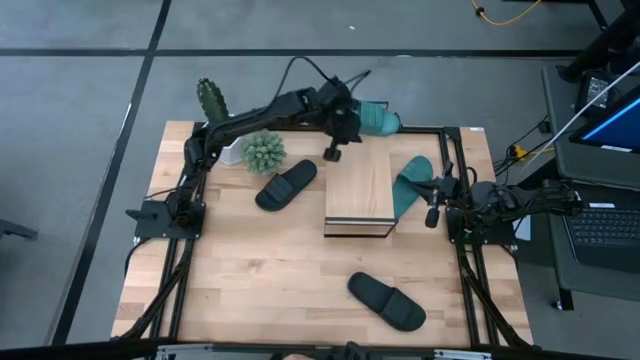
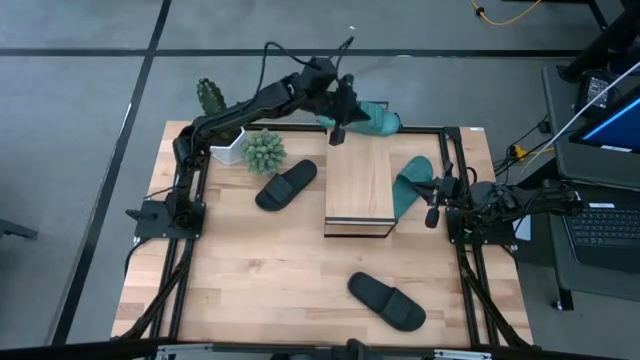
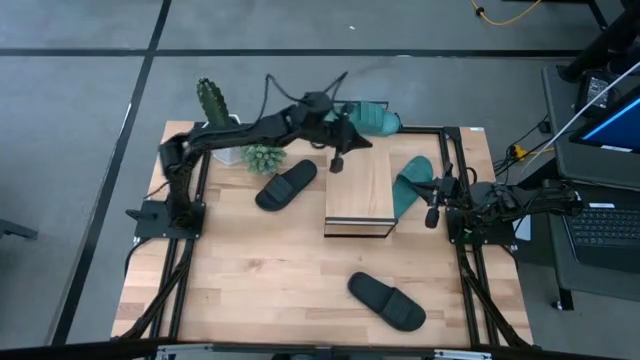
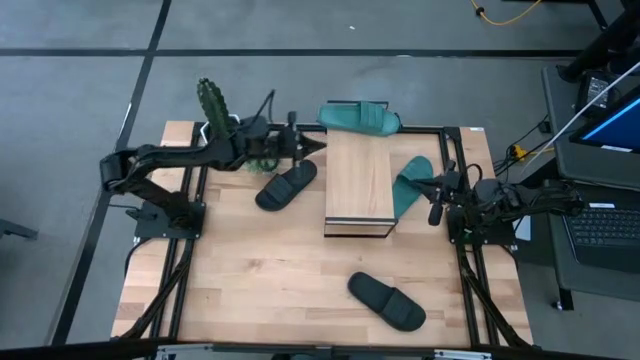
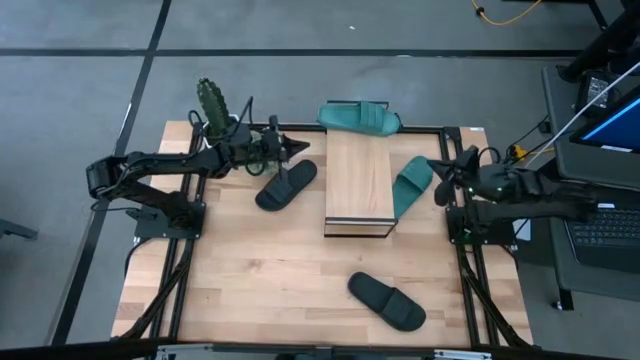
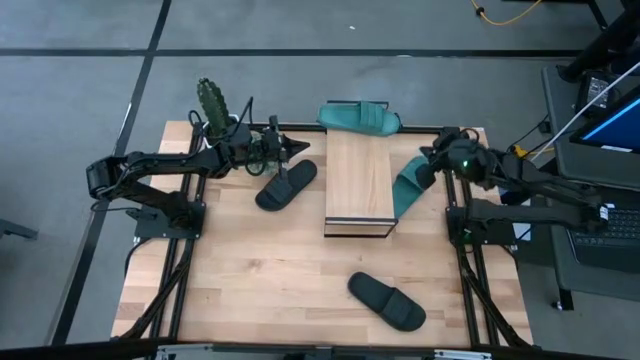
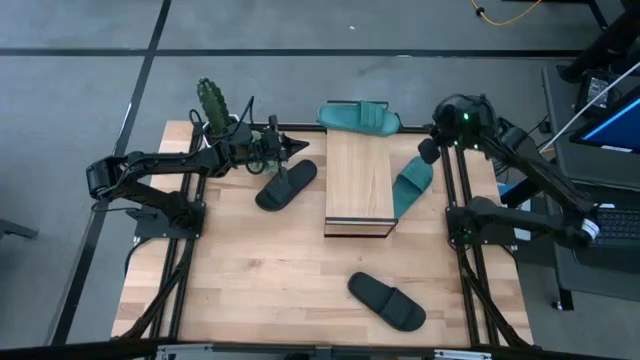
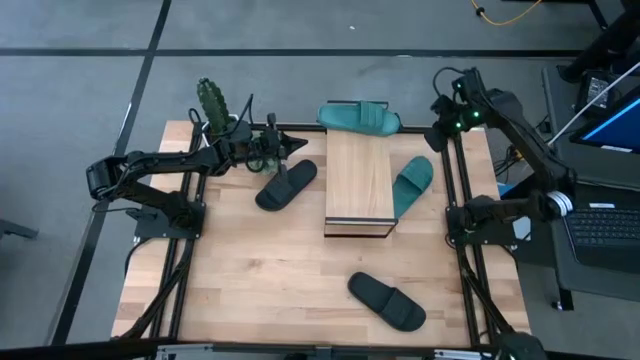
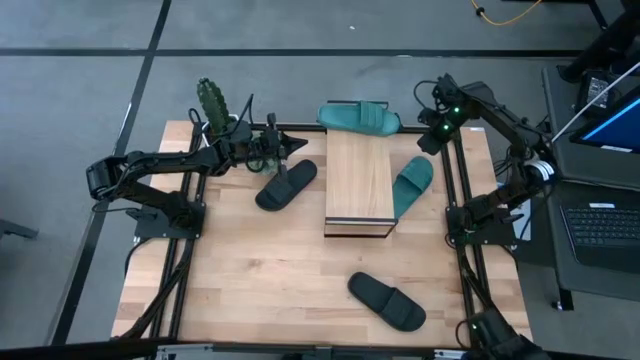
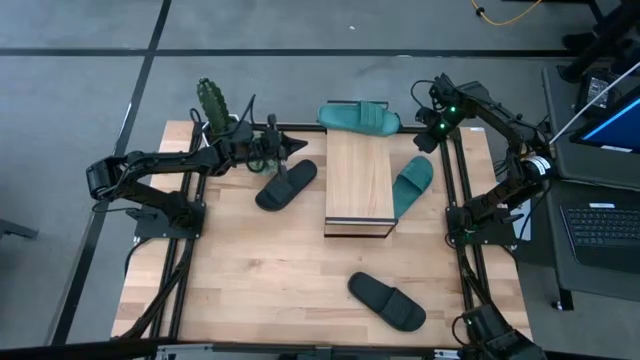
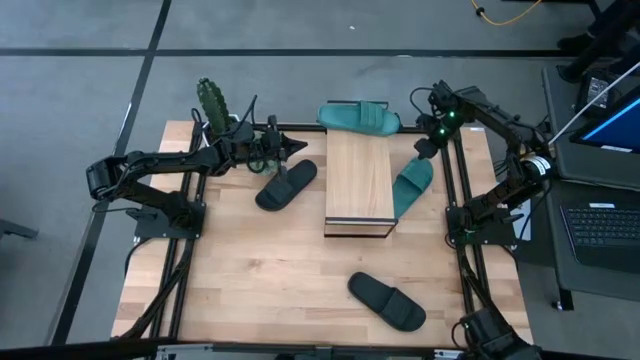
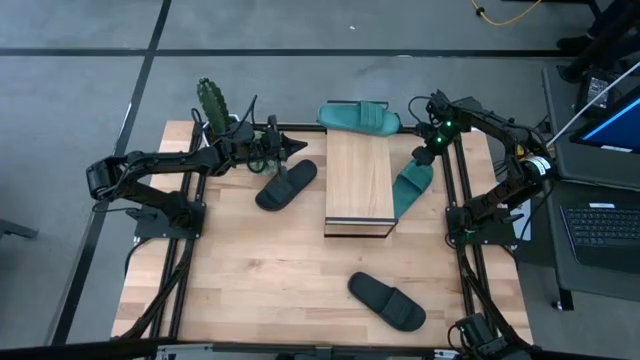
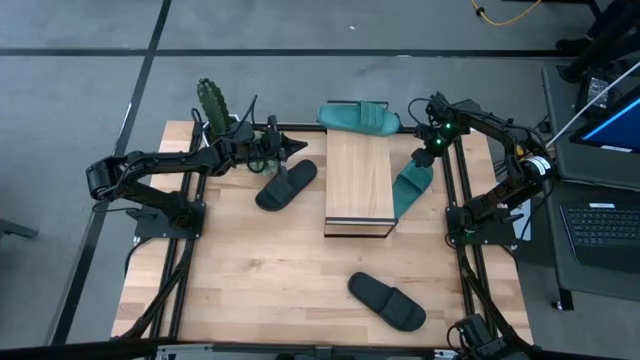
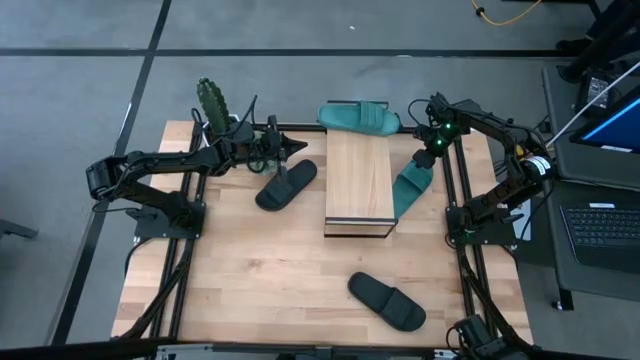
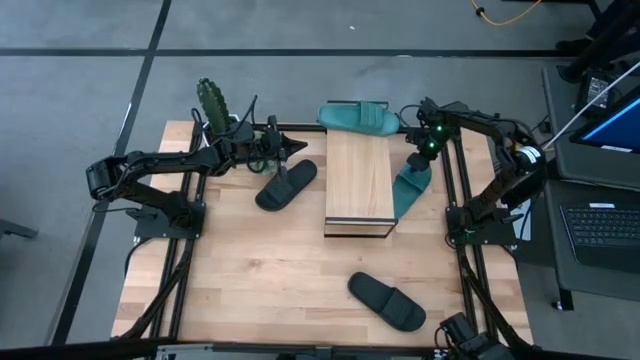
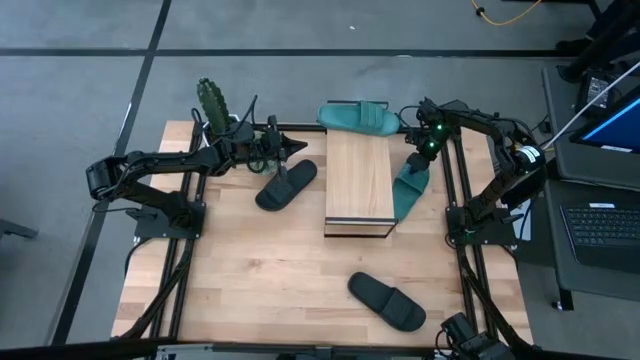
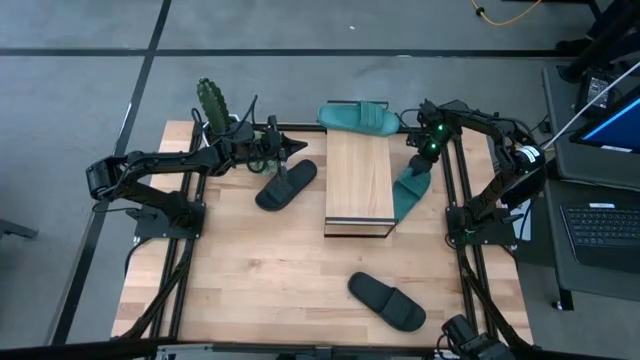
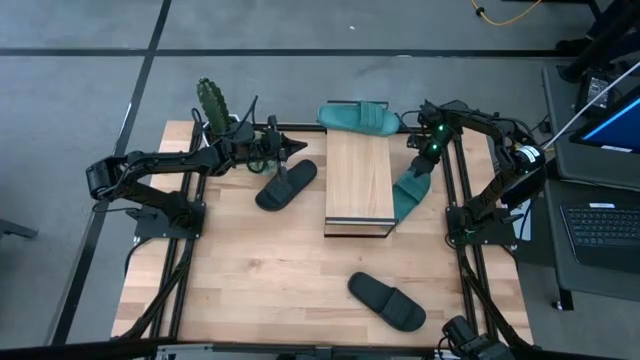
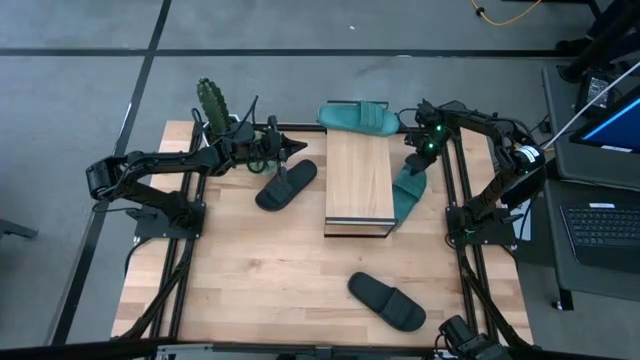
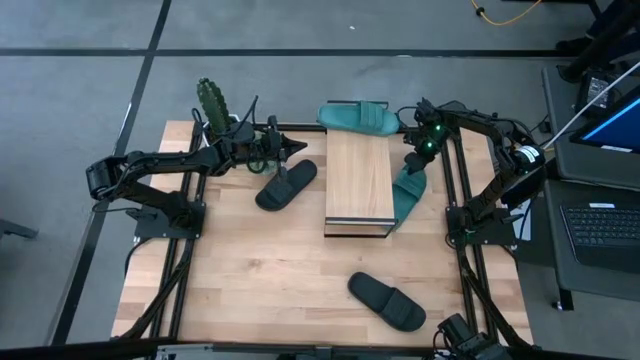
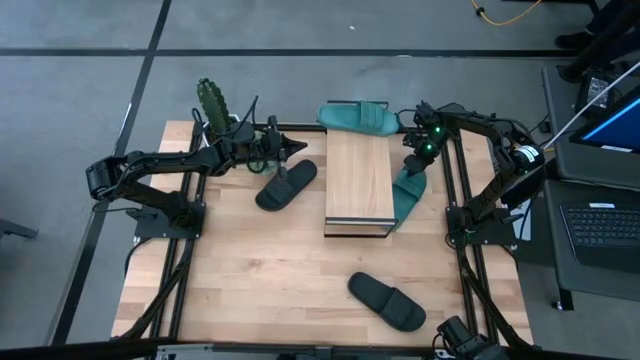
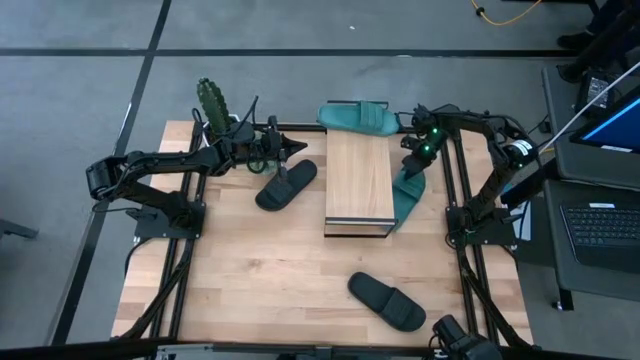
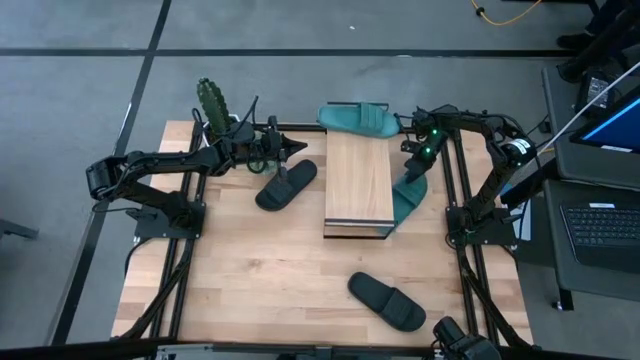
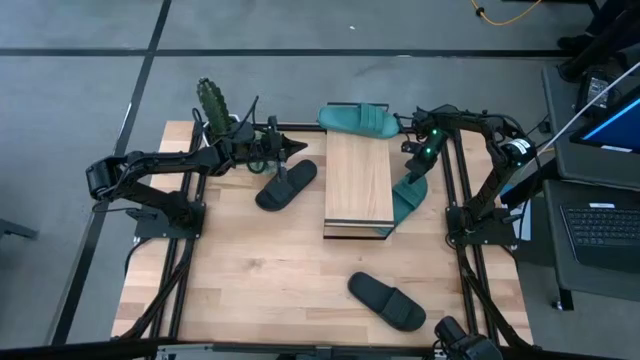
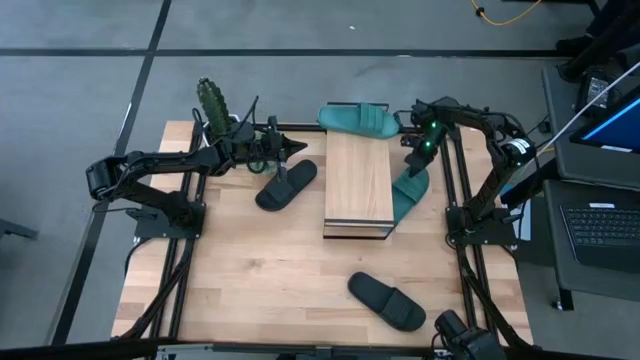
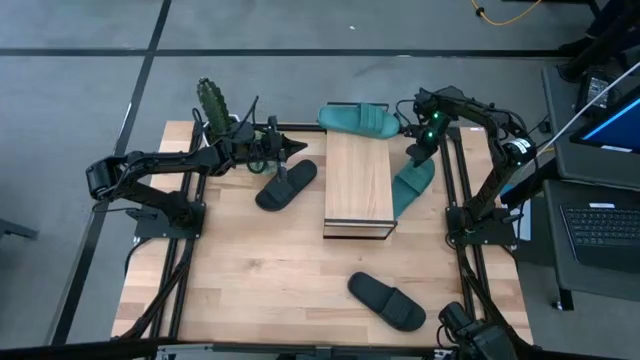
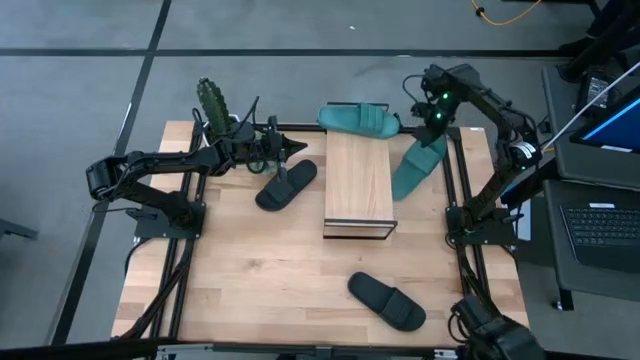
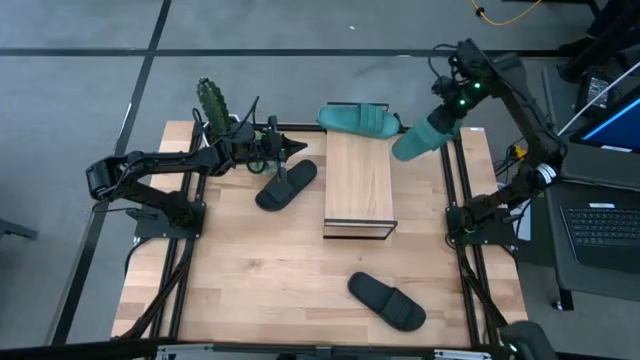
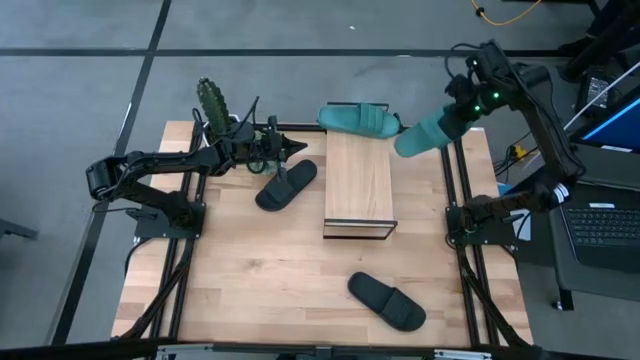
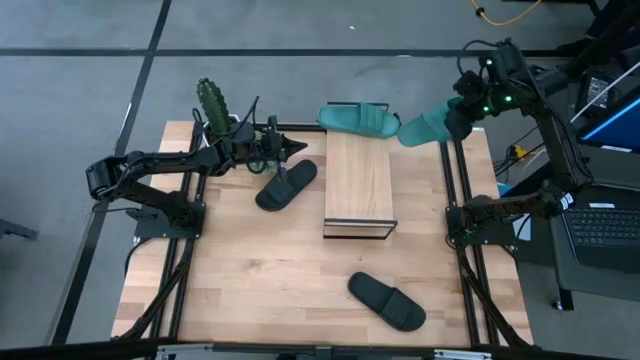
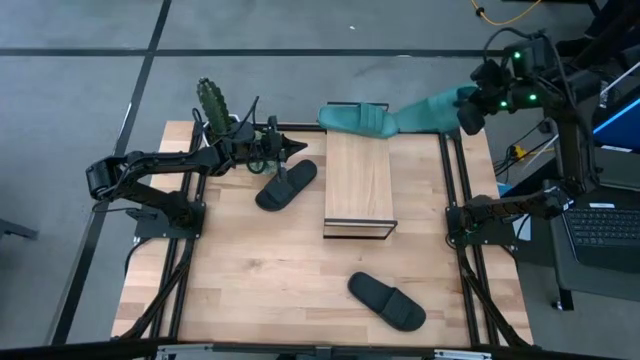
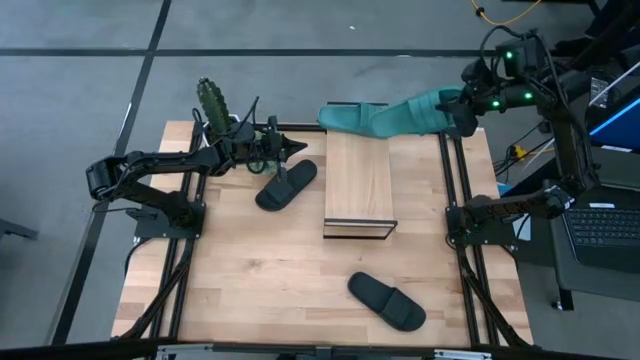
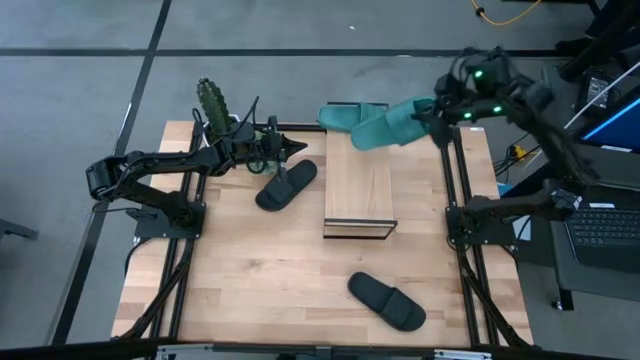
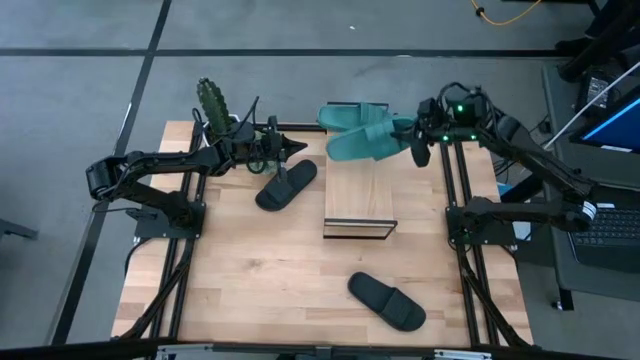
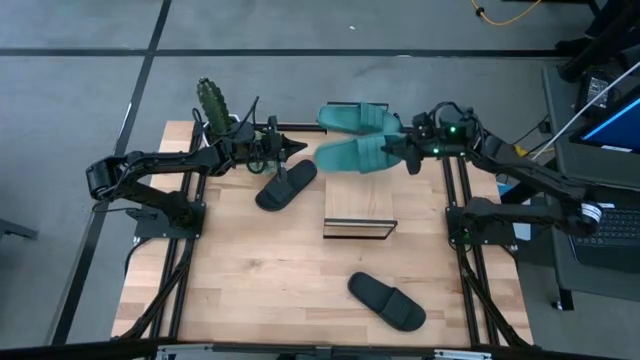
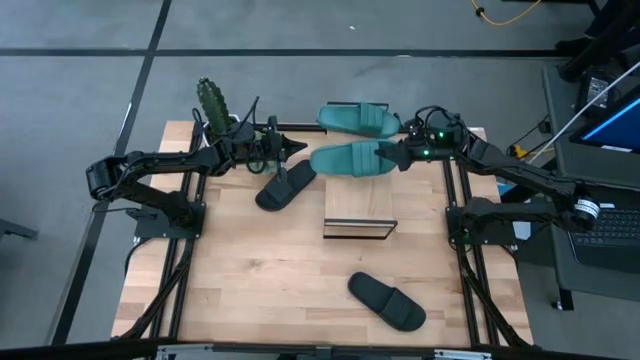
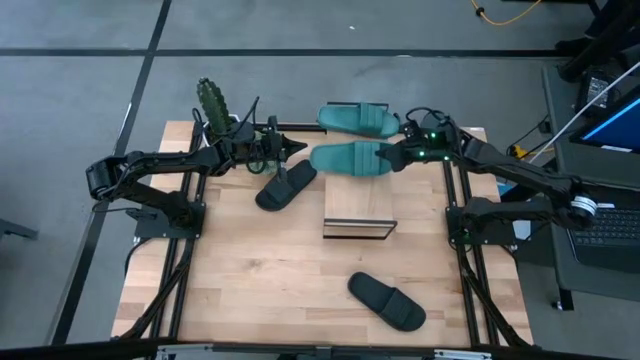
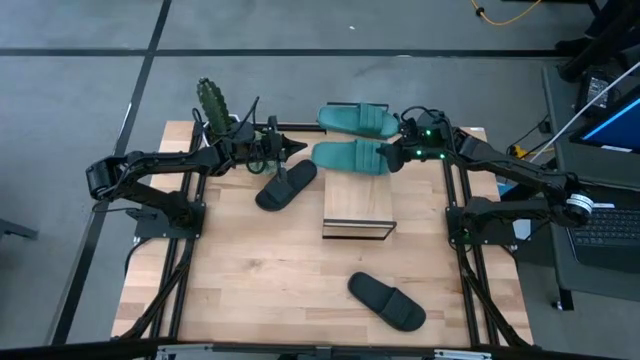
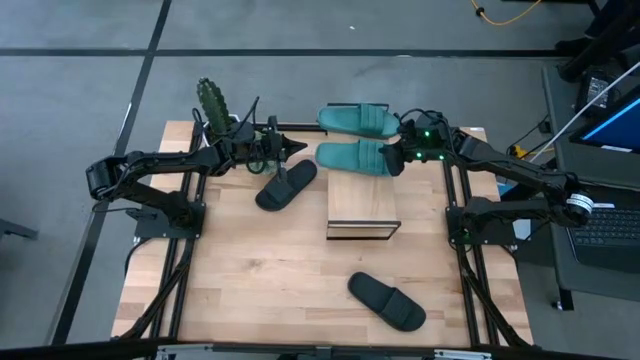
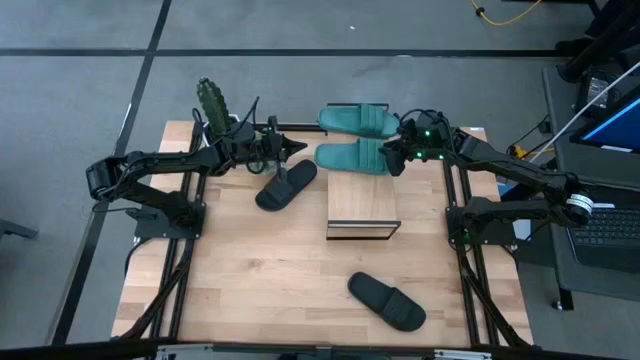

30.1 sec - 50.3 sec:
Task: Pick and place slides into the shelf
Put the green slide on the shelf
